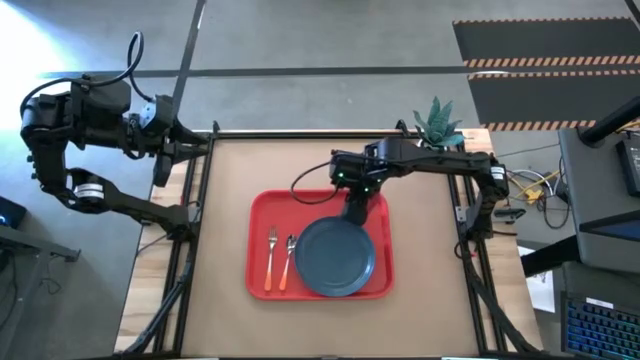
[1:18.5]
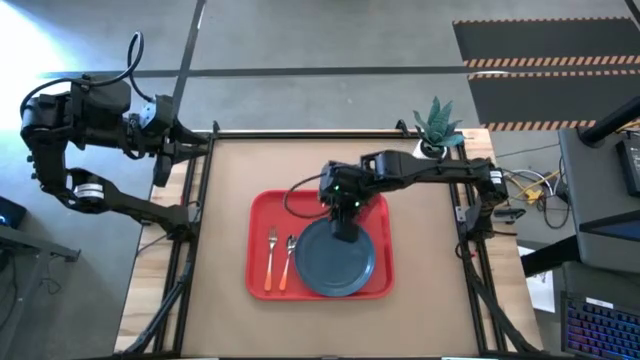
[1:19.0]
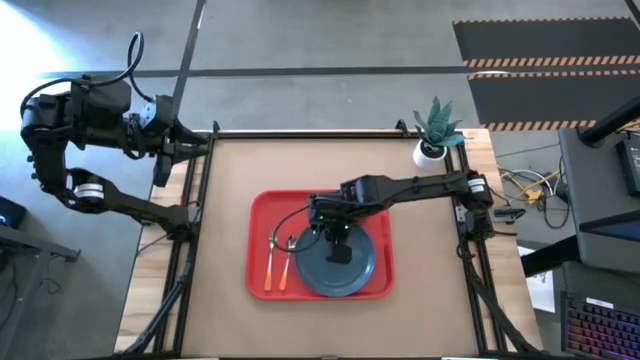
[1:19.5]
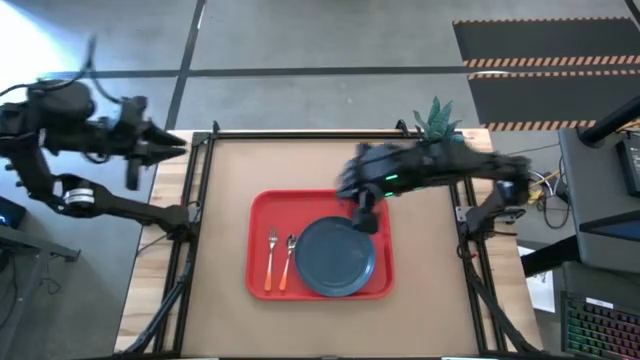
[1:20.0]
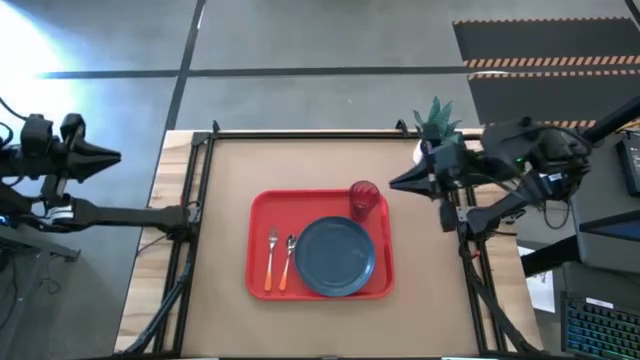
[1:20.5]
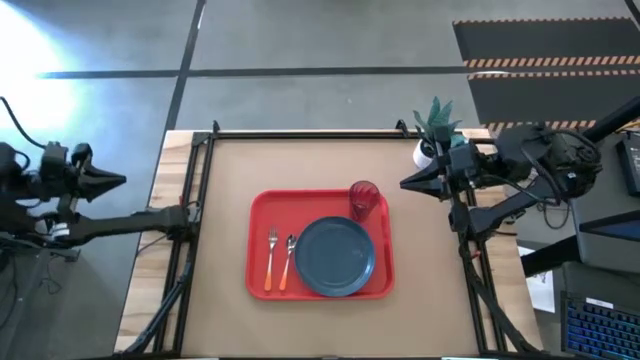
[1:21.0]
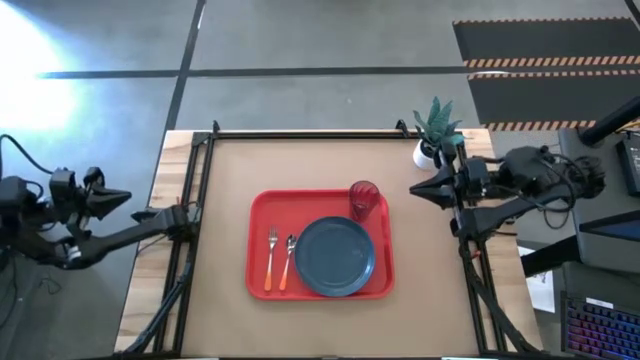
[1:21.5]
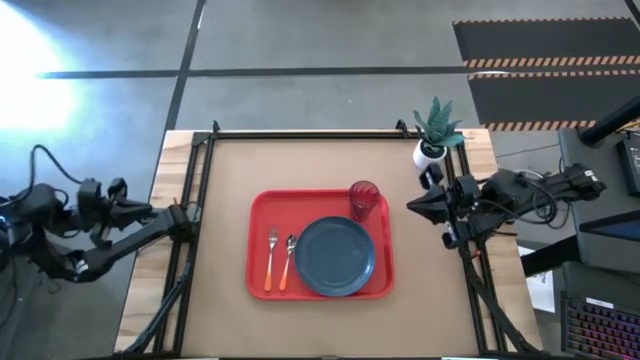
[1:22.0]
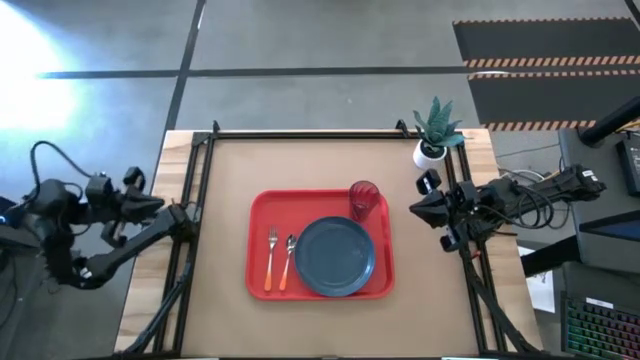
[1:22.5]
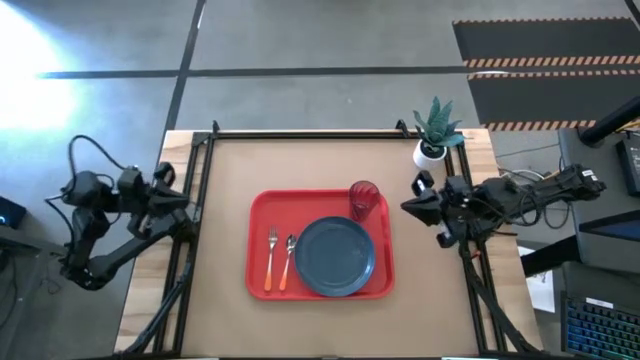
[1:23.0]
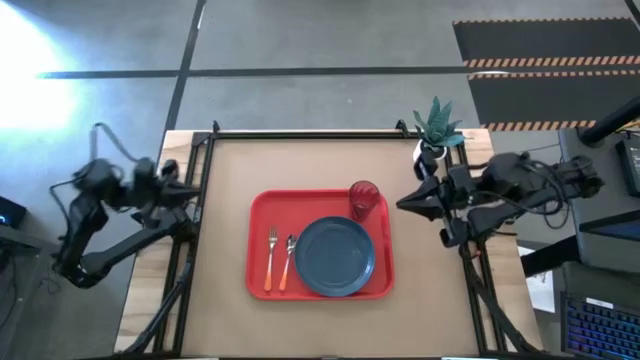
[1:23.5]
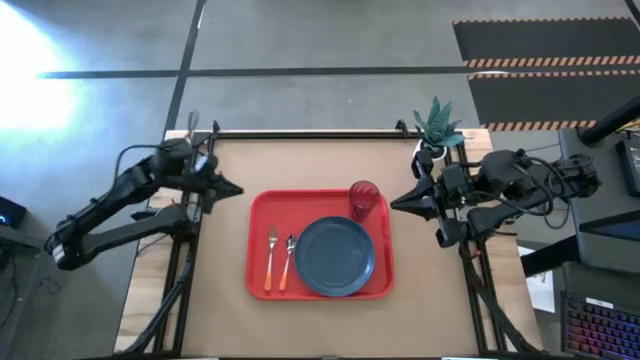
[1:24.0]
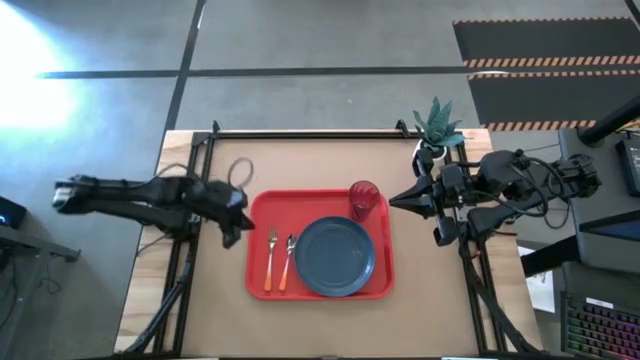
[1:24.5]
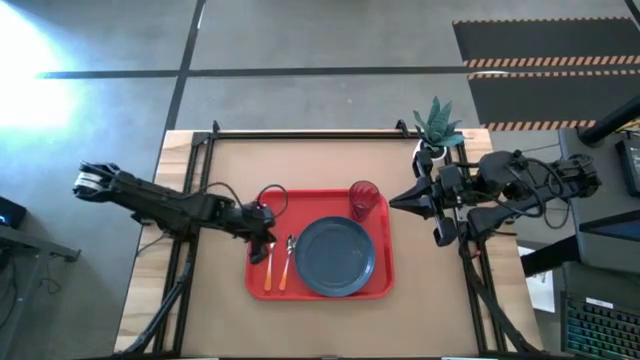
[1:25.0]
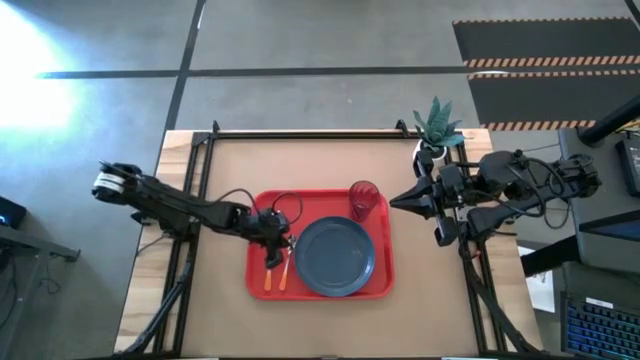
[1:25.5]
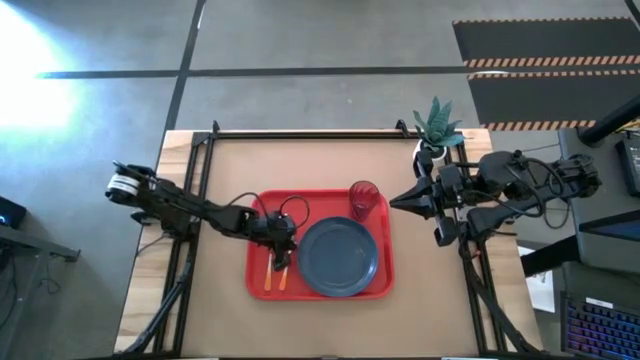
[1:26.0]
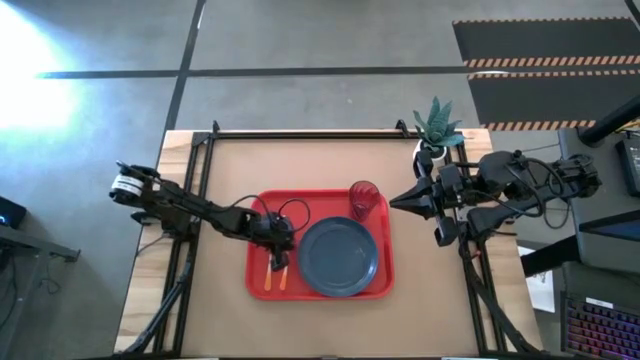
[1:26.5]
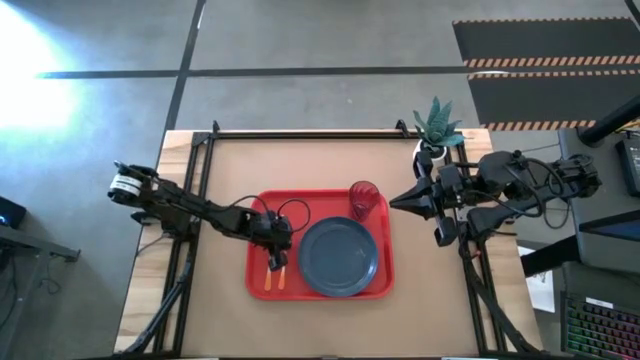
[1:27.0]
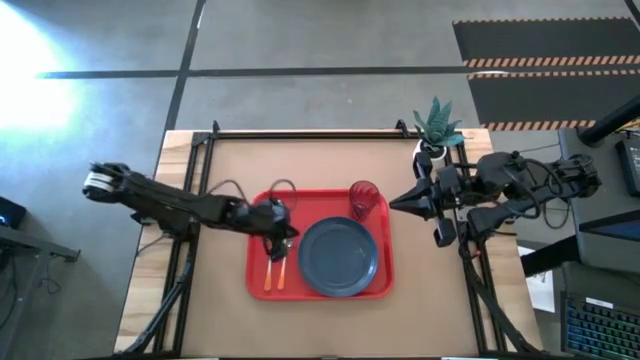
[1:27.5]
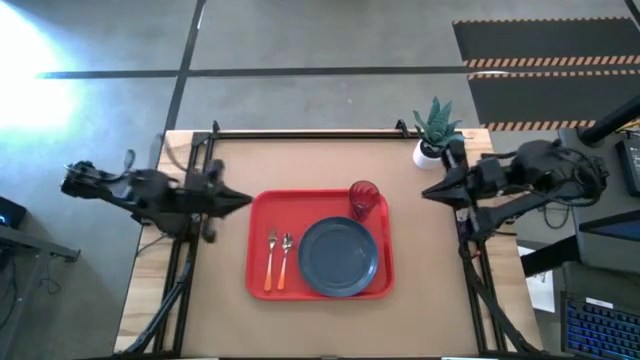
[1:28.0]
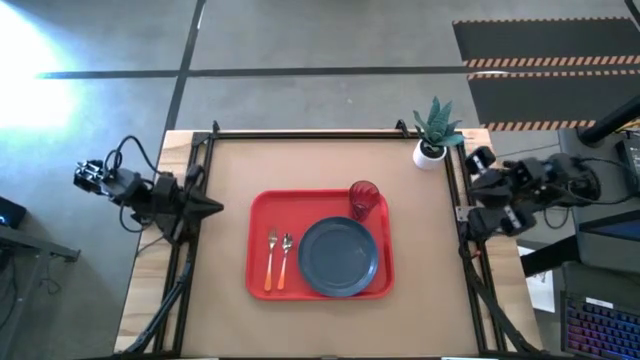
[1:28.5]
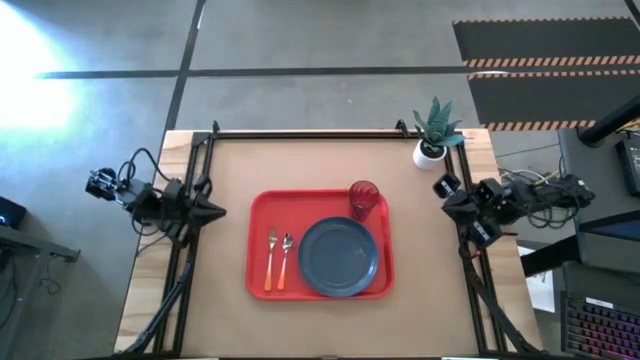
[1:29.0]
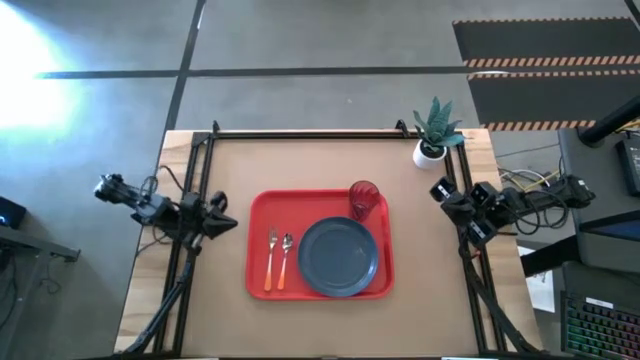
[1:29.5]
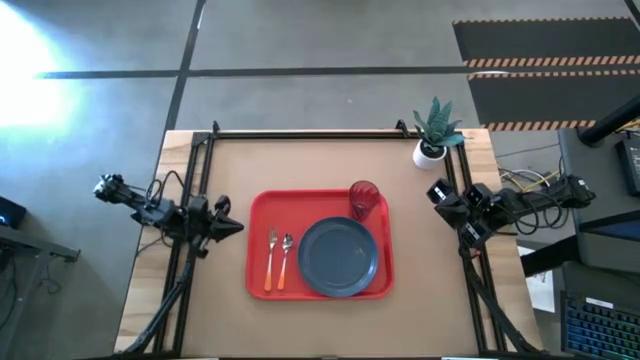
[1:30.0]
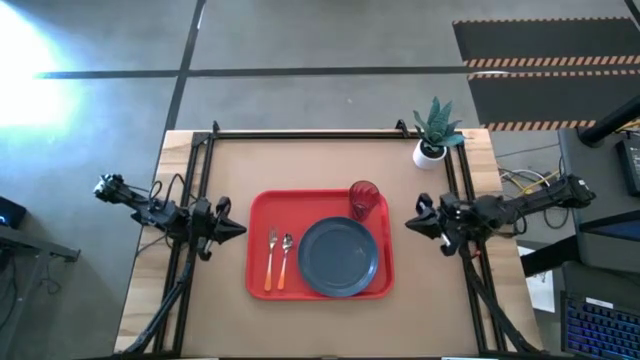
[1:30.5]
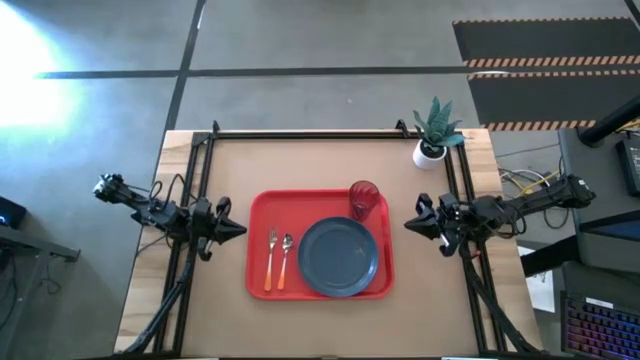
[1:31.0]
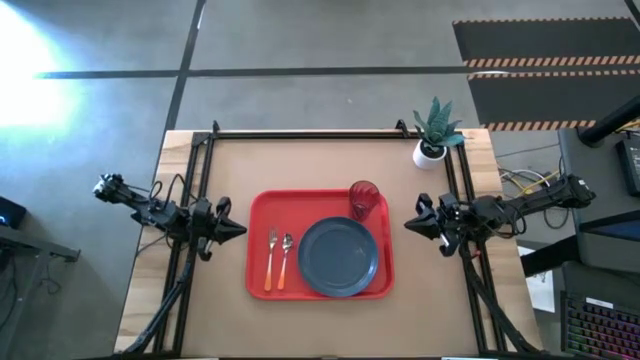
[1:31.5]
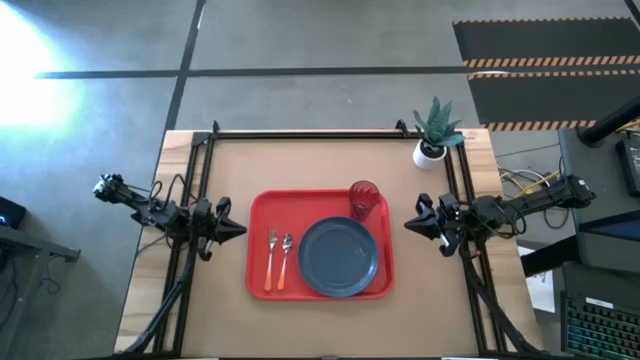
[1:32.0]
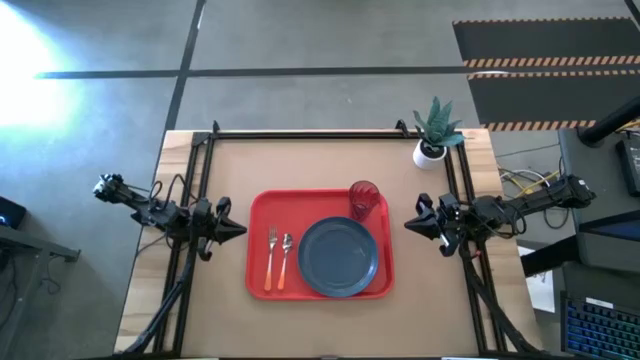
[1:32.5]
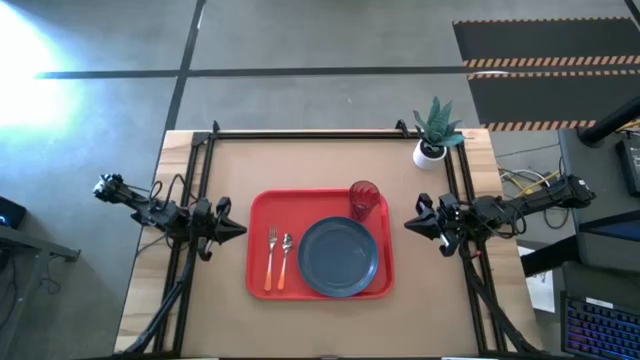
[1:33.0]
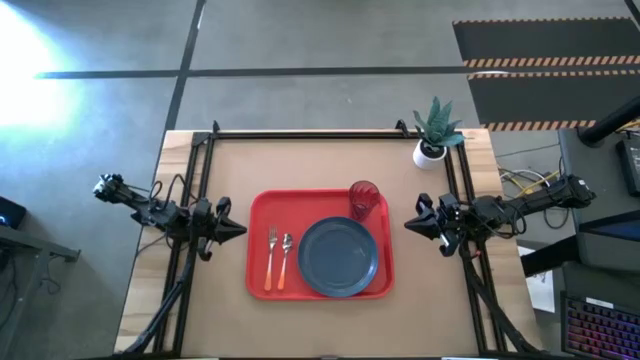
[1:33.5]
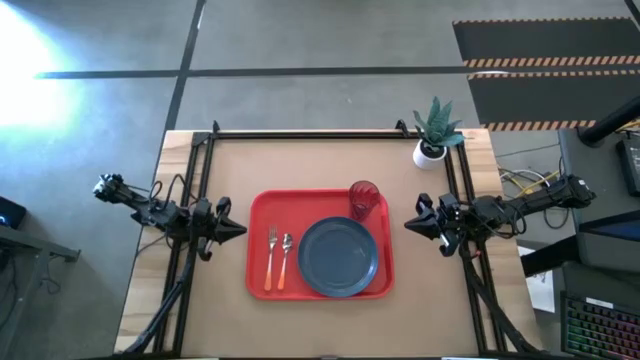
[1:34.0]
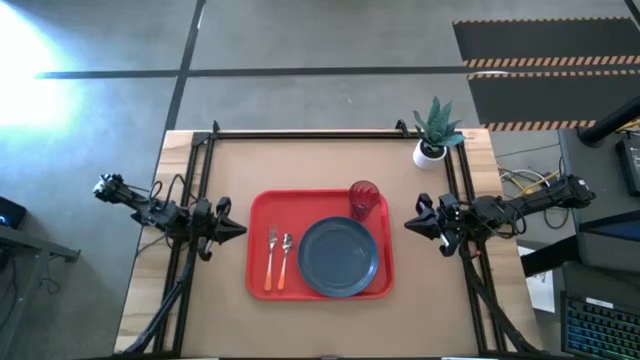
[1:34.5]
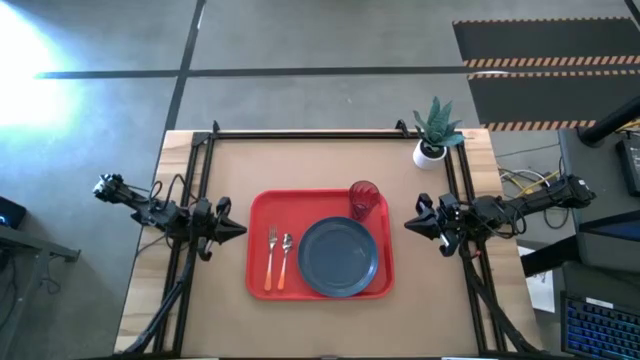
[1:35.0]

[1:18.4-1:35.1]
Task: Pick and place plate/cup/fork/spoon on tray
Return to Home Position

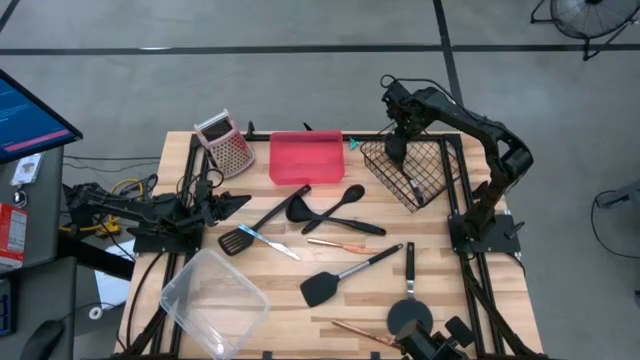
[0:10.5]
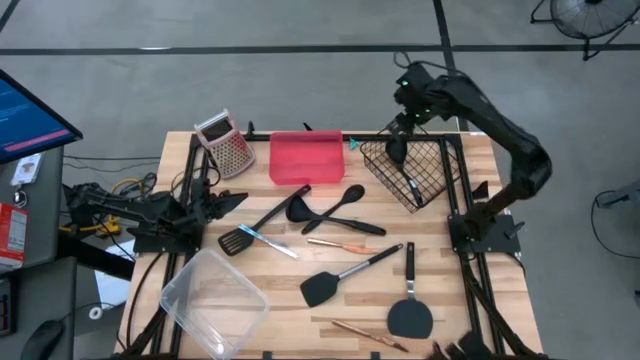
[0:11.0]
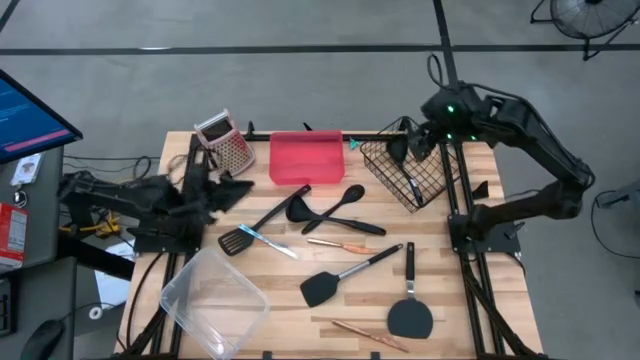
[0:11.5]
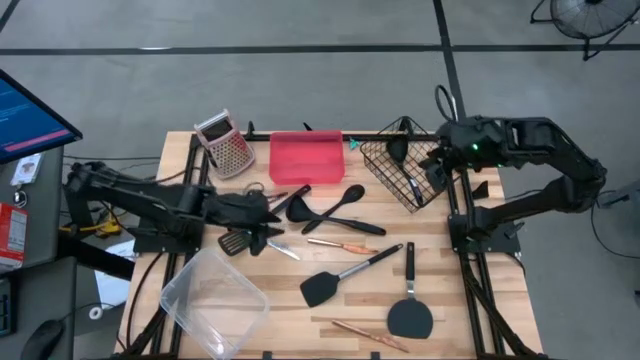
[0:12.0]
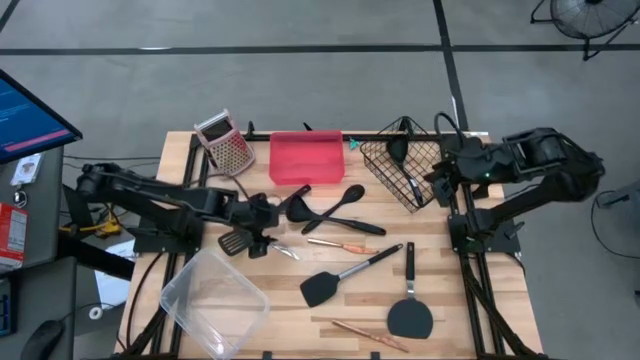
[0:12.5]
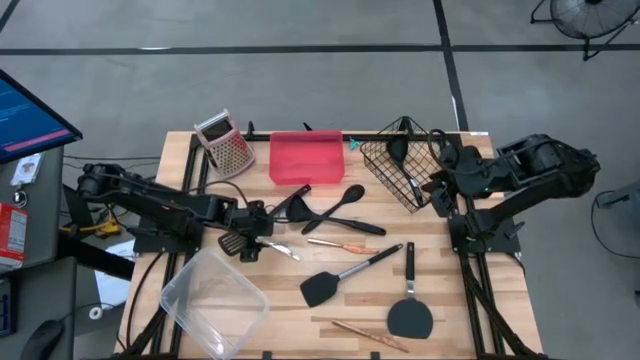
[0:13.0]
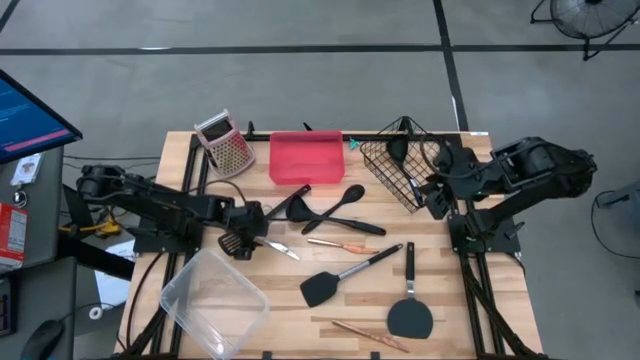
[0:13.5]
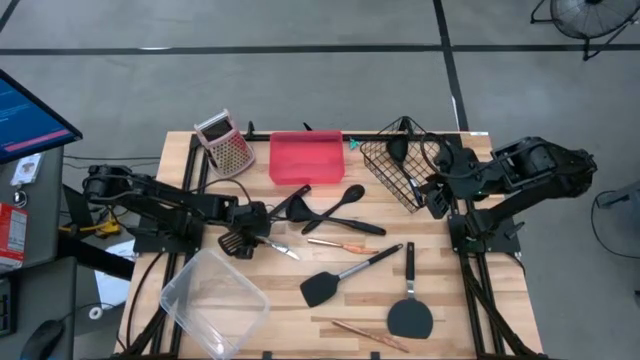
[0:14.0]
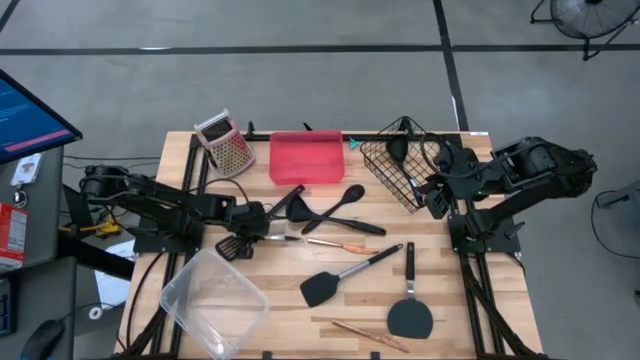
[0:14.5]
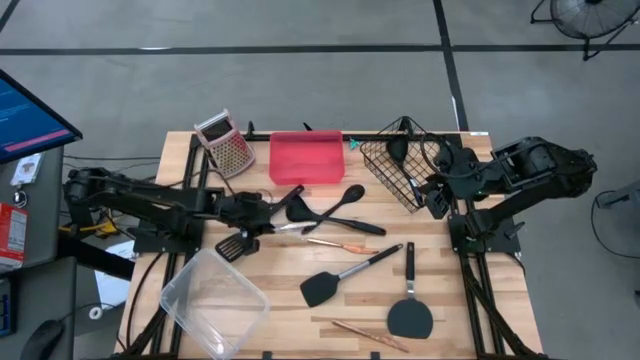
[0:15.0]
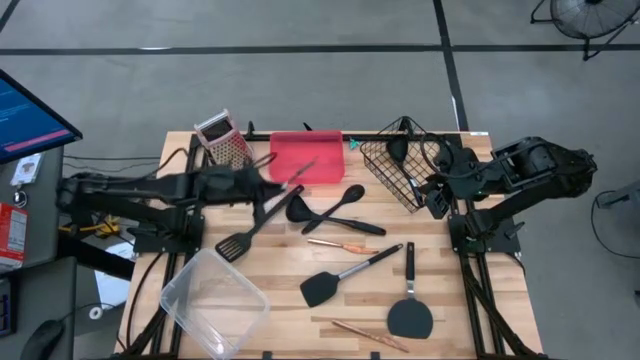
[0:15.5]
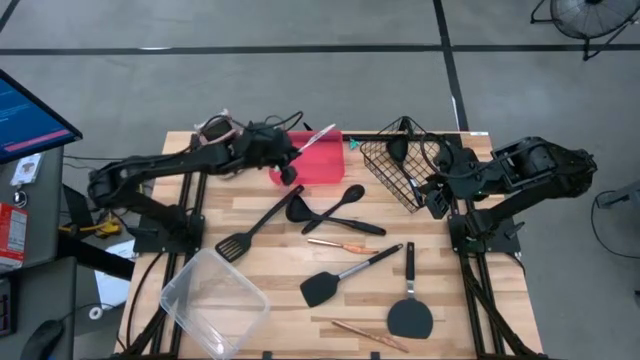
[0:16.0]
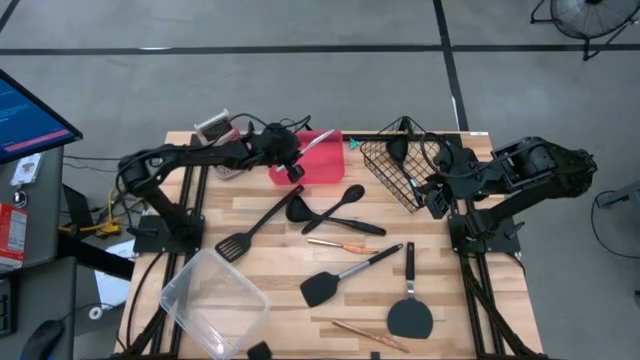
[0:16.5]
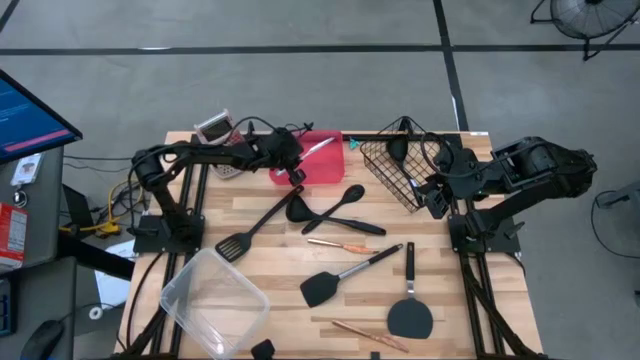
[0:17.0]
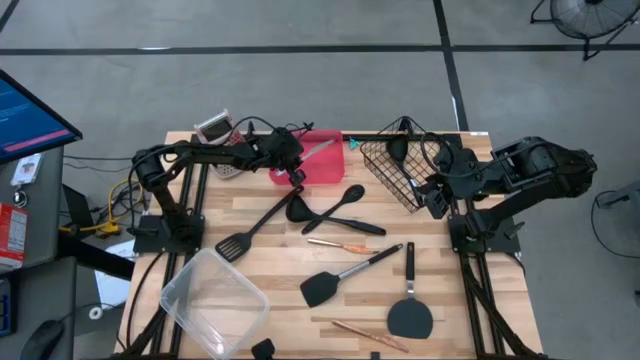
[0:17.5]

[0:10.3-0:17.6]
Task: Pick & Place Kitchen Items
Put the white table knife into the pink bin
